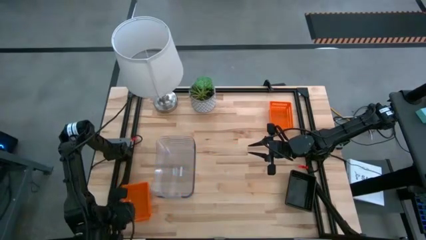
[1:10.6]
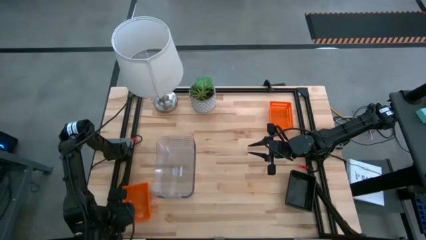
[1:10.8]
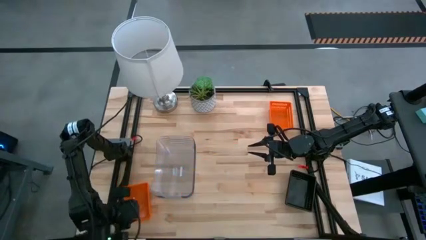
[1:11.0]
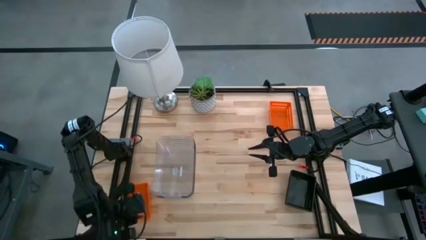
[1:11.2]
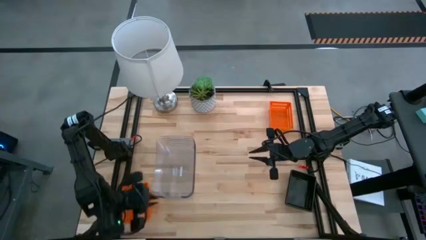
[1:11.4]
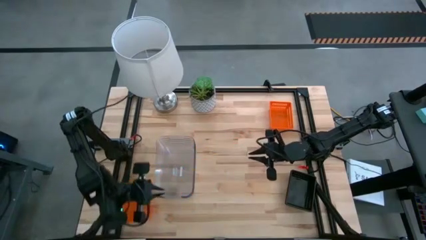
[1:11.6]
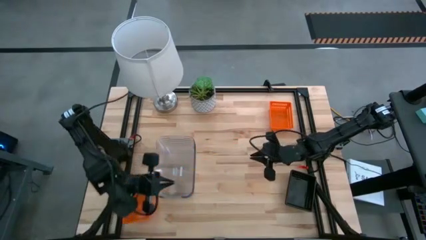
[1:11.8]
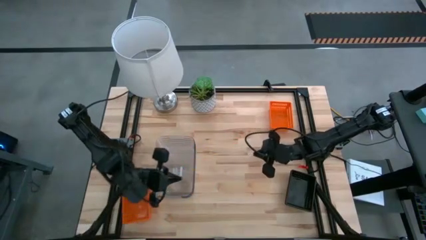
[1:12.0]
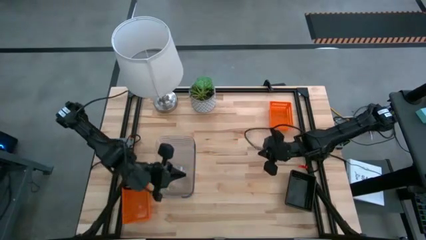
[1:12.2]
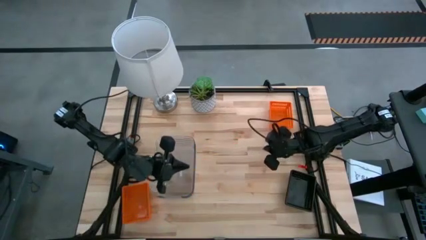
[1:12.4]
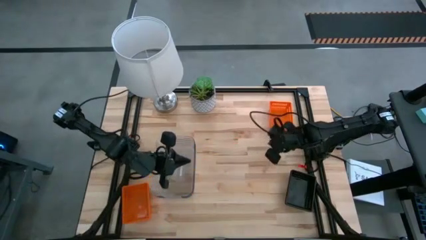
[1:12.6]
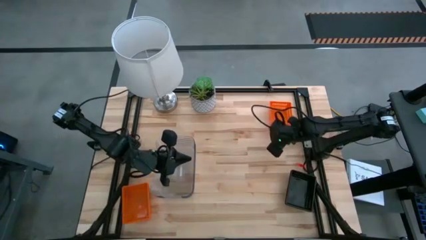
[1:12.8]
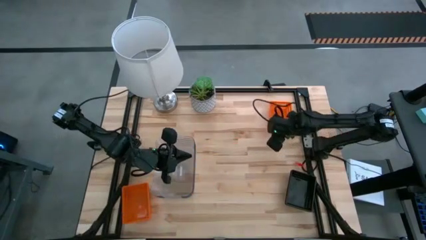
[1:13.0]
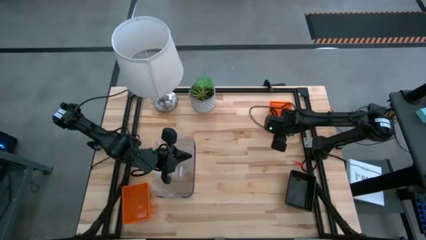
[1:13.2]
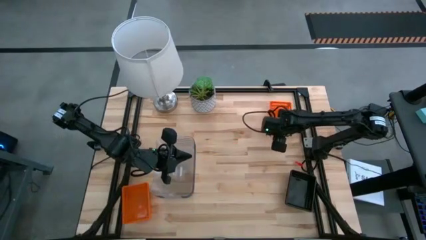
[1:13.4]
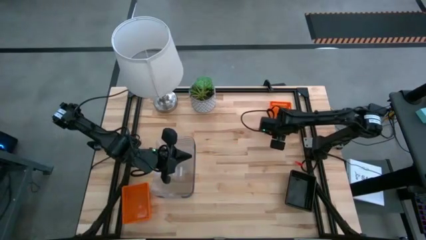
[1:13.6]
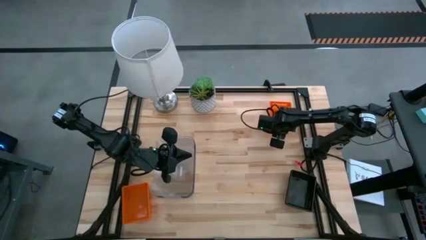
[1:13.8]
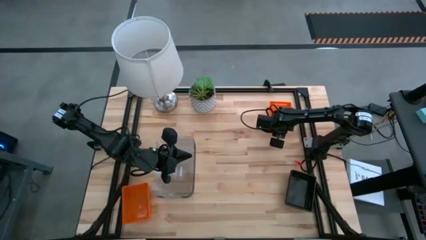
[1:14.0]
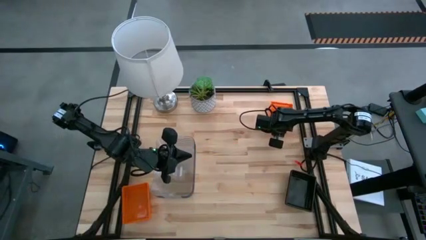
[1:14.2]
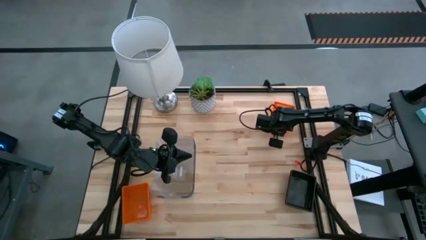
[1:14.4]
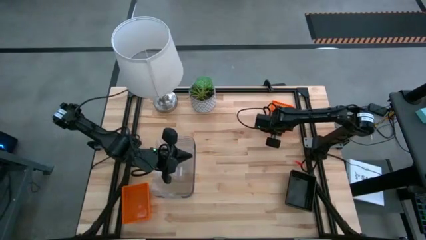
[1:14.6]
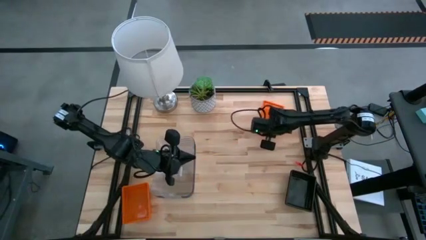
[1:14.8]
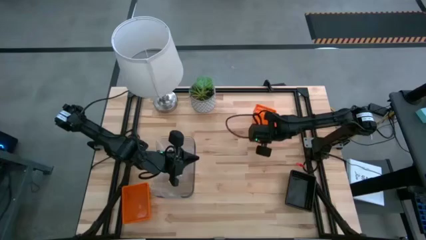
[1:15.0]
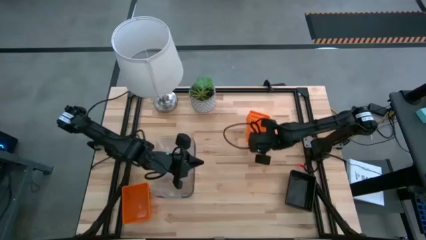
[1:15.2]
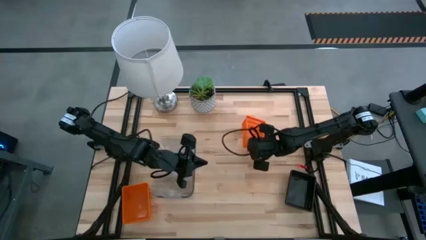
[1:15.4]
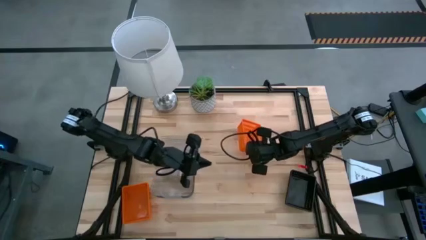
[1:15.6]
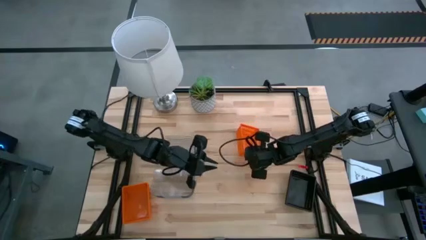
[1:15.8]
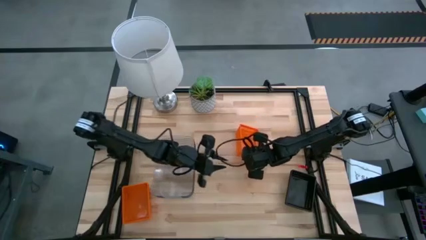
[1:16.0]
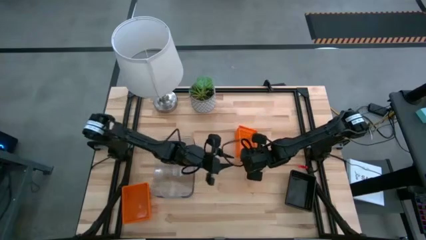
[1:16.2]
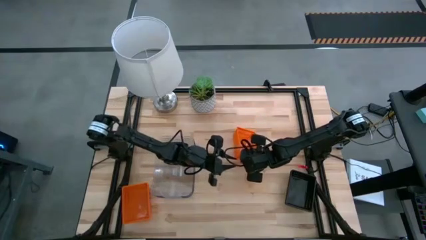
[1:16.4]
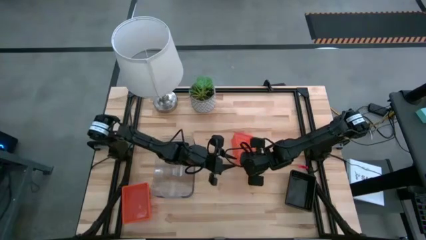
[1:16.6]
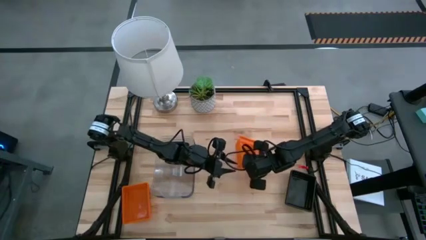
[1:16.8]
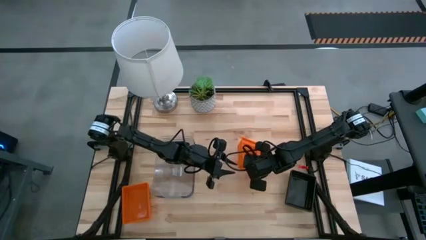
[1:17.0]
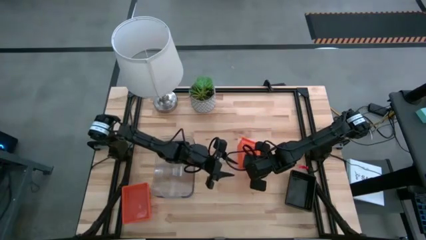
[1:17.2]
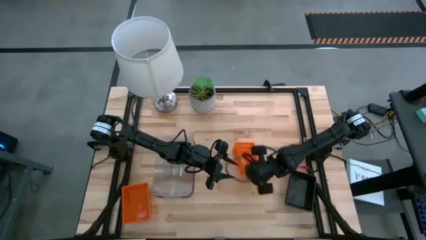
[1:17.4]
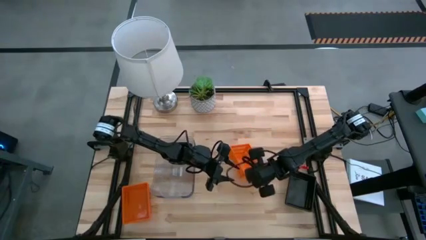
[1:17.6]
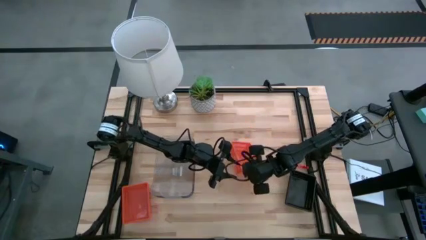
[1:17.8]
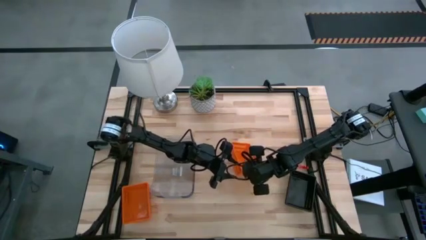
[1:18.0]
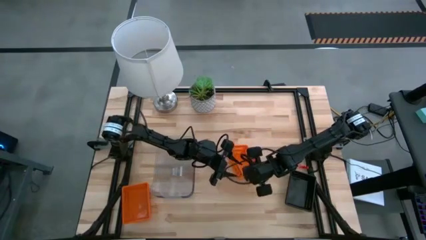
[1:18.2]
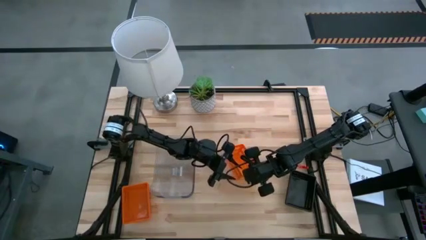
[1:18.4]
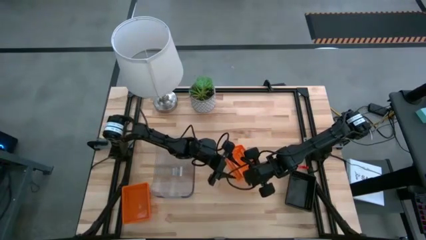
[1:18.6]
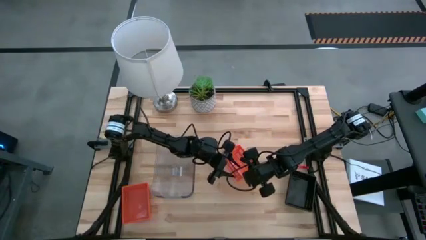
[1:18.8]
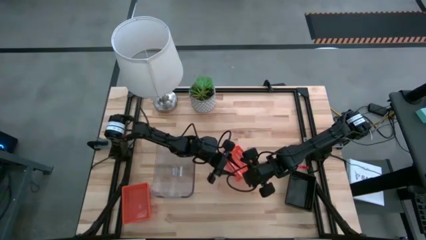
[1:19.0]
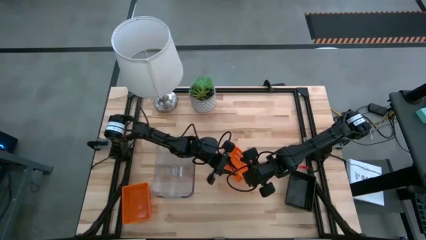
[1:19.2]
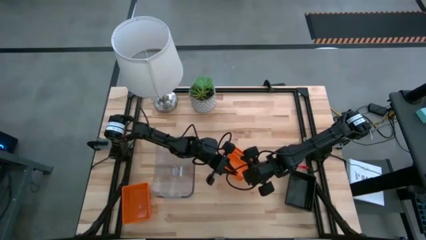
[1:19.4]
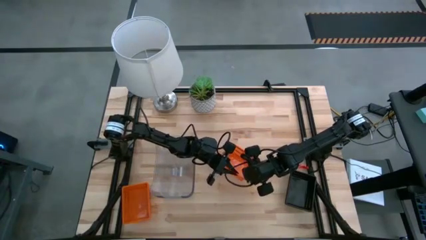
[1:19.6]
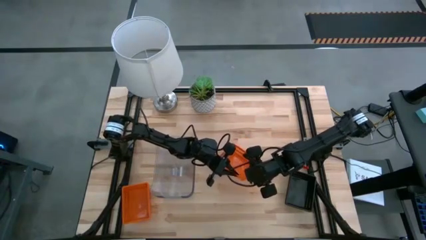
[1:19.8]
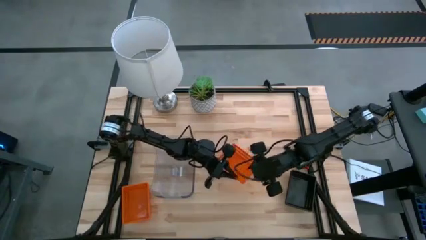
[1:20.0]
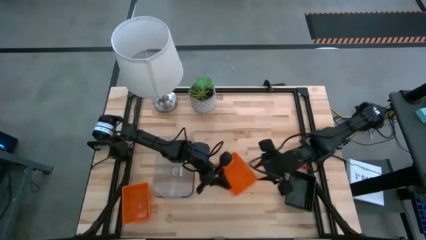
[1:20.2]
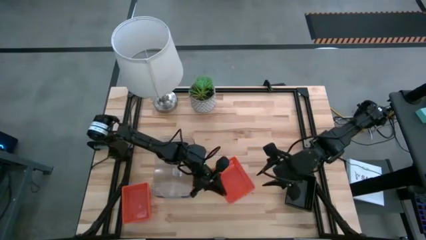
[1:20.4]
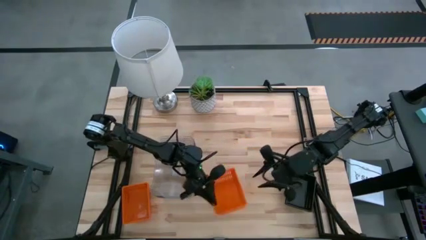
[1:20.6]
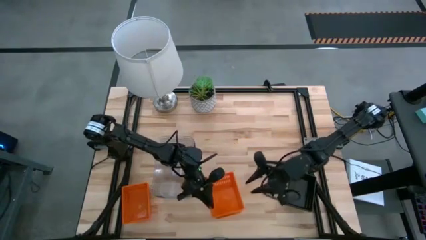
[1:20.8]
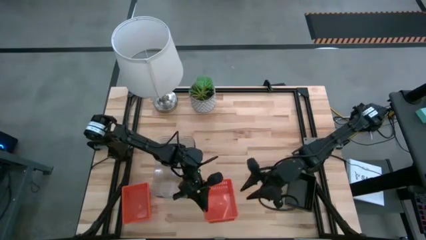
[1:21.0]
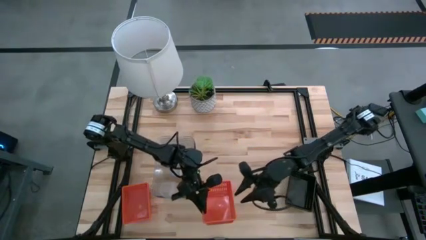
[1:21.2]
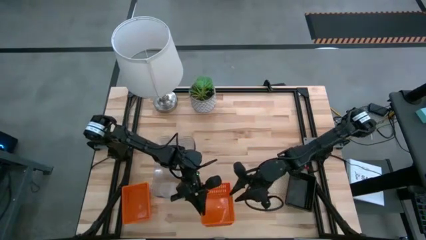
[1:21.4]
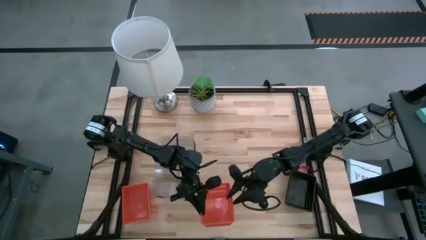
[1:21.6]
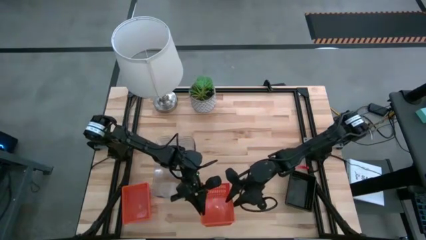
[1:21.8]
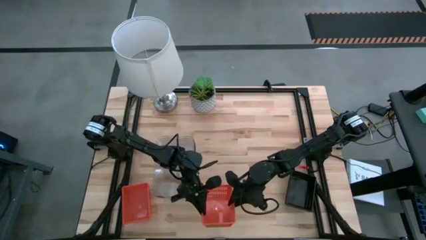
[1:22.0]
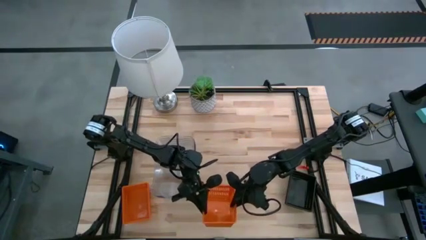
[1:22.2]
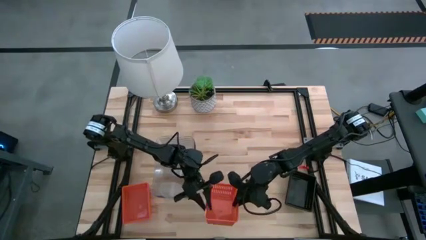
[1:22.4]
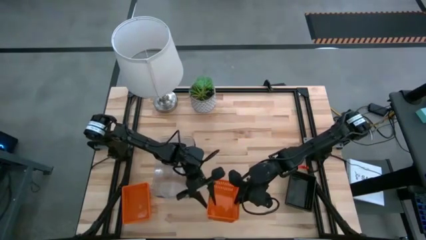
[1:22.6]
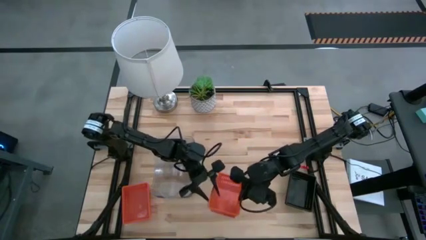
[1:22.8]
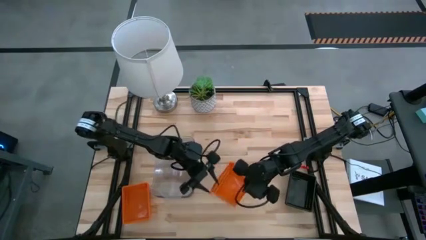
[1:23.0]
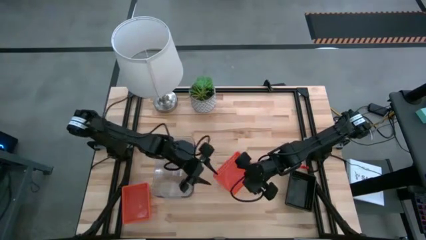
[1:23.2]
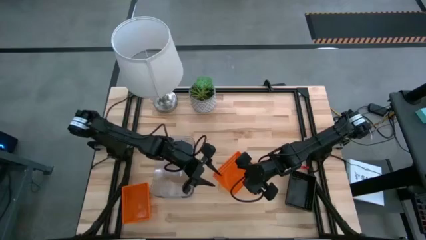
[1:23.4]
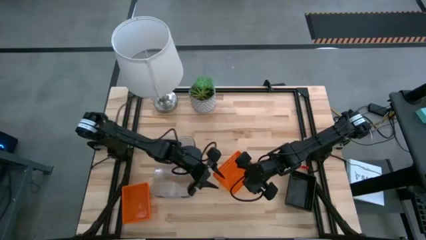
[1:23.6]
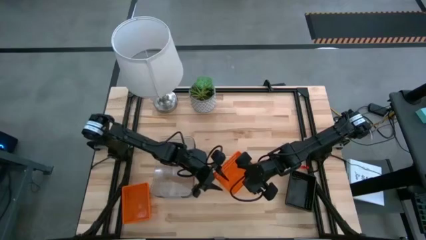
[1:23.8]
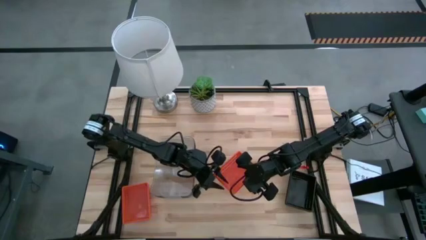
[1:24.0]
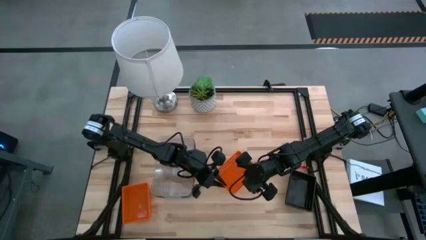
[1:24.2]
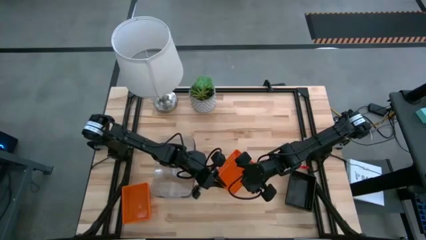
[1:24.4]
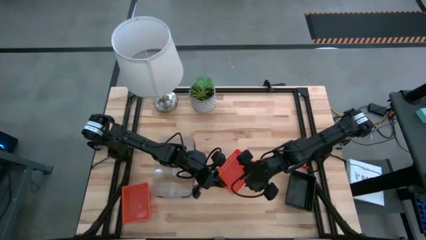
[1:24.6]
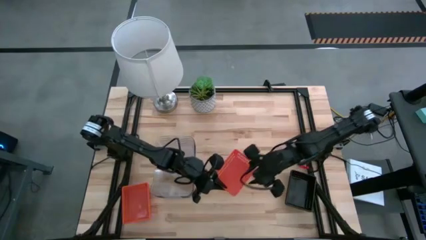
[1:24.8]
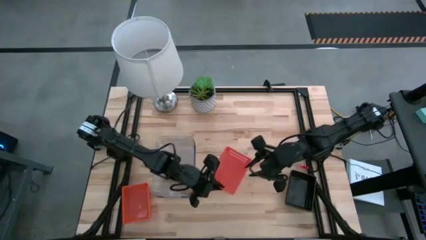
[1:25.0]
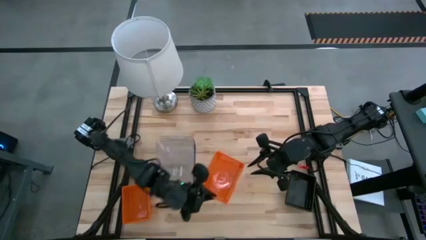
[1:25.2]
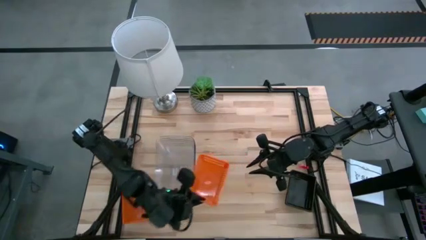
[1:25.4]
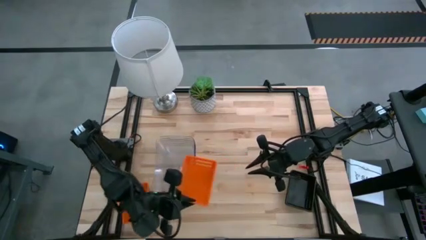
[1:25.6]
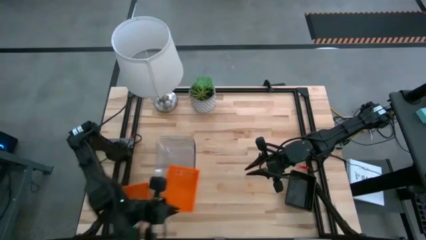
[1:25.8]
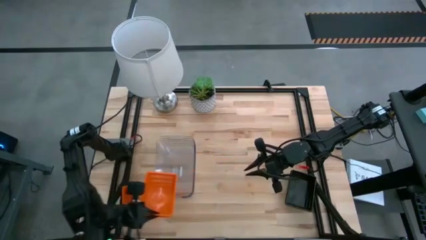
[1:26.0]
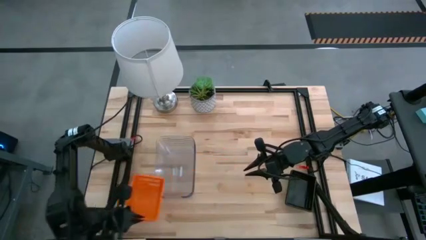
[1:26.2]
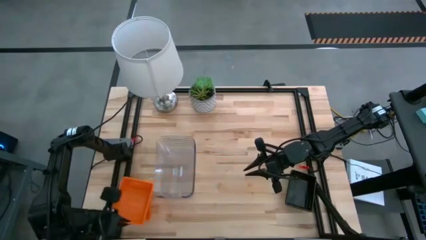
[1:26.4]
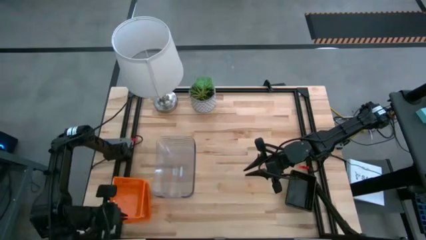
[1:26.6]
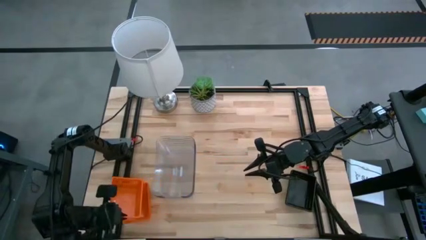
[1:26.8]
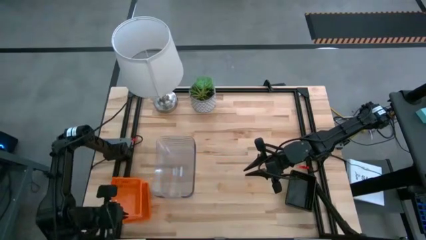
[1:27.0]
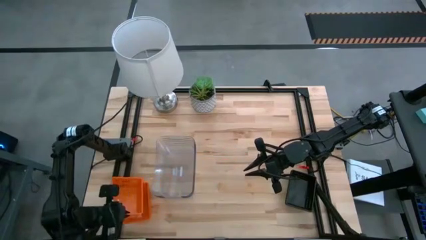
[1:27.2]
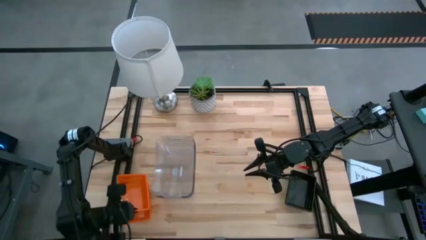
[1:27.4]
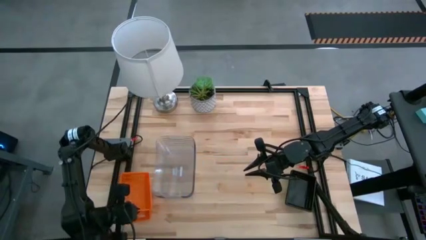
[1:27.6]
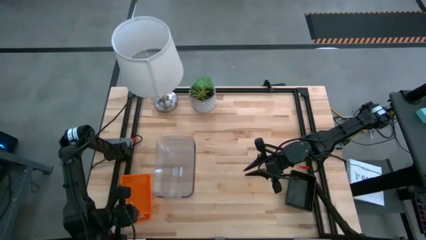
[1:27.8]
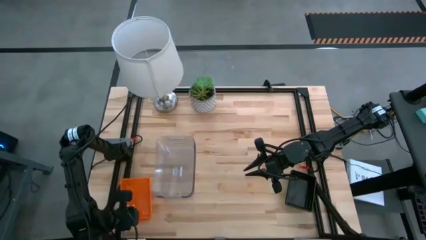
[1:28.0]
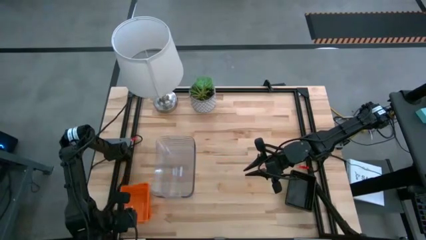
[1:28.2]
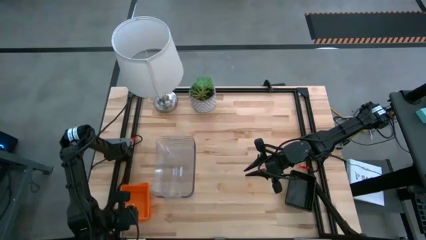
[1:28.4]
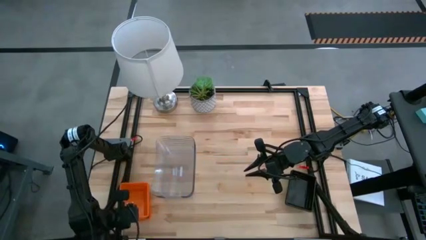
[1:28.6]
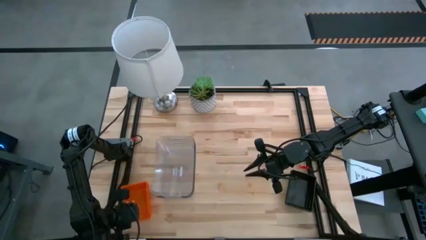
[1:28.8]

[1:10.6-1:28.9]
Stack the top orange bin on the bottom stacked orange bins
